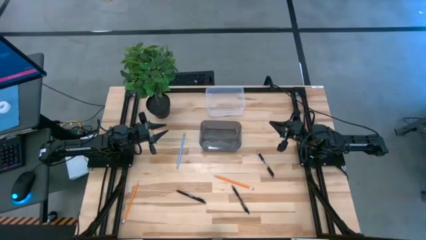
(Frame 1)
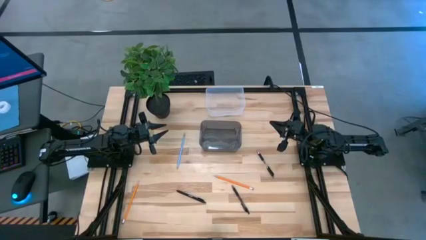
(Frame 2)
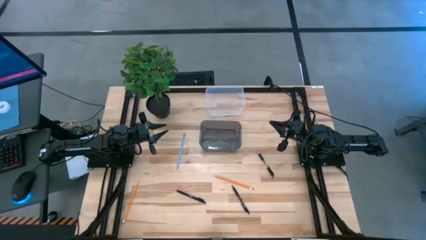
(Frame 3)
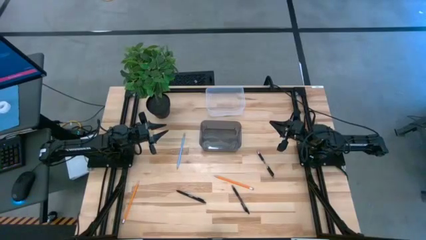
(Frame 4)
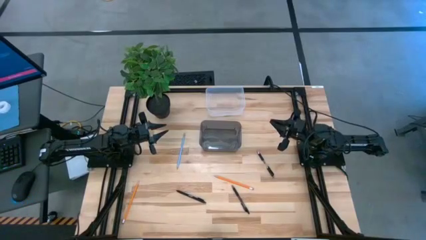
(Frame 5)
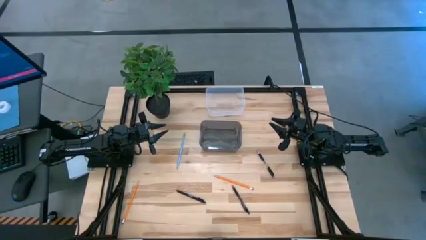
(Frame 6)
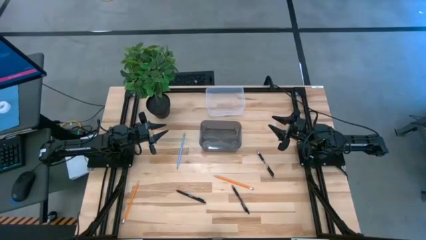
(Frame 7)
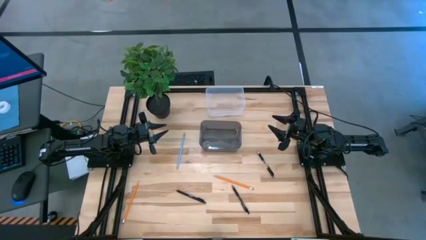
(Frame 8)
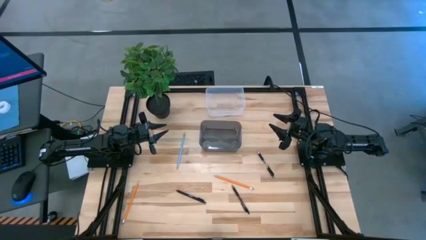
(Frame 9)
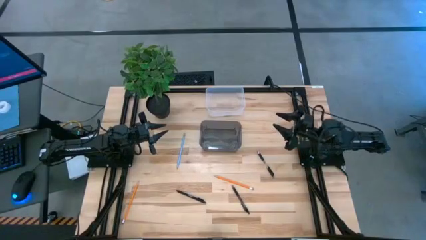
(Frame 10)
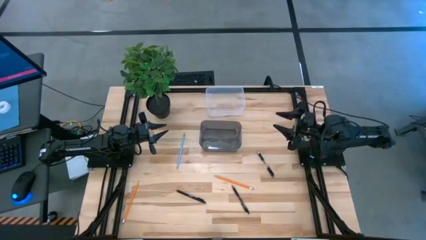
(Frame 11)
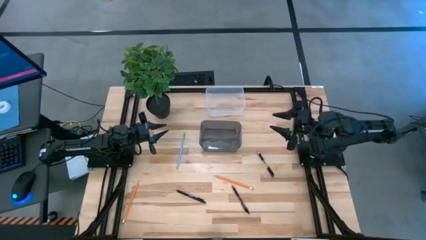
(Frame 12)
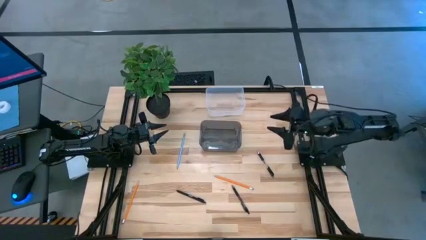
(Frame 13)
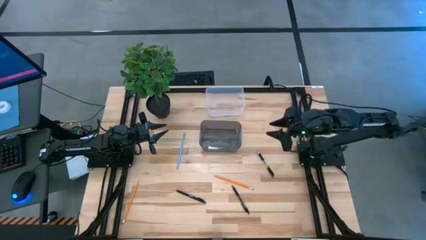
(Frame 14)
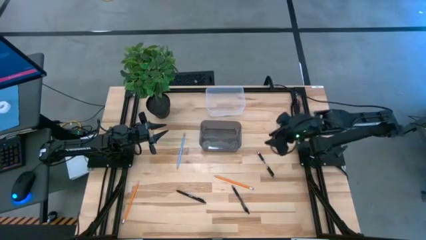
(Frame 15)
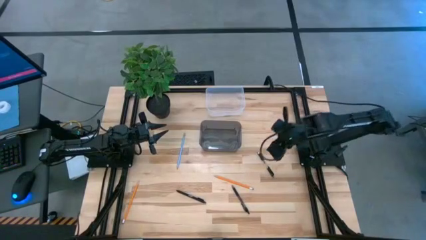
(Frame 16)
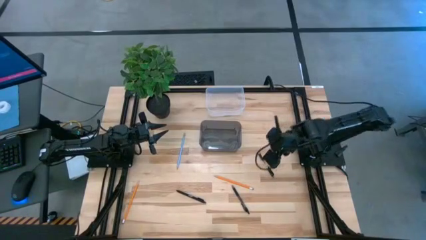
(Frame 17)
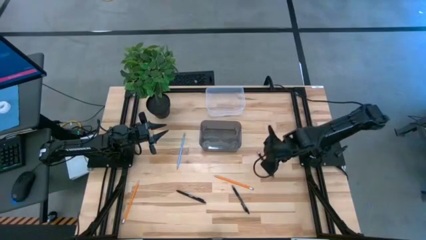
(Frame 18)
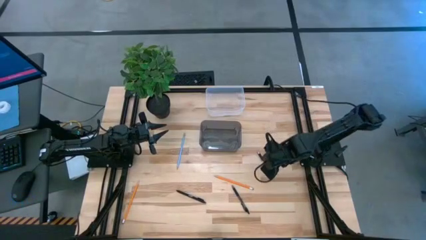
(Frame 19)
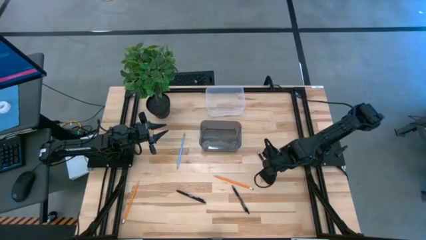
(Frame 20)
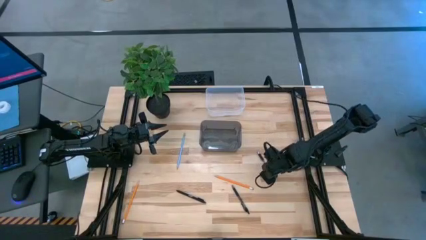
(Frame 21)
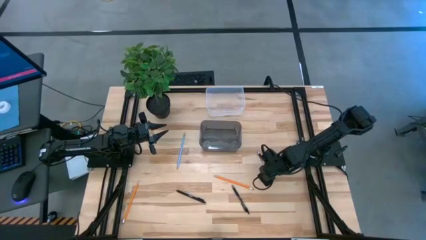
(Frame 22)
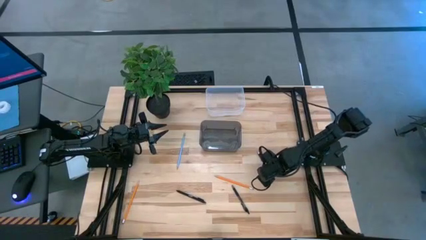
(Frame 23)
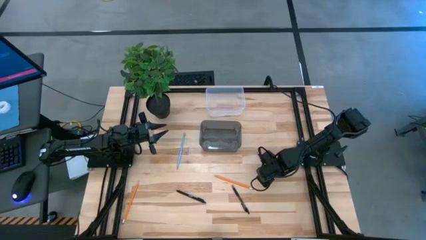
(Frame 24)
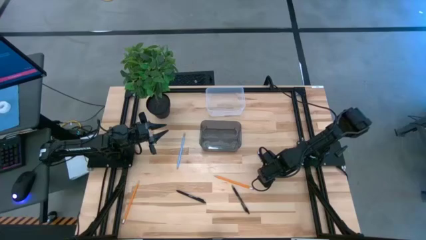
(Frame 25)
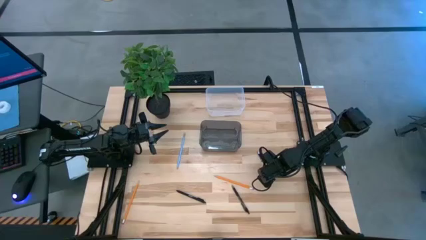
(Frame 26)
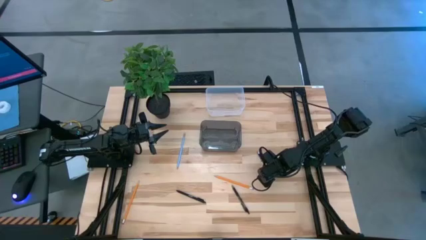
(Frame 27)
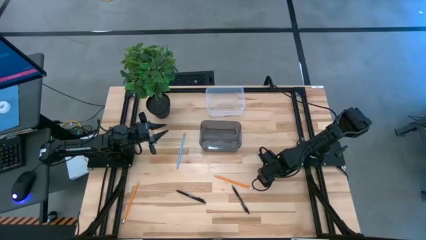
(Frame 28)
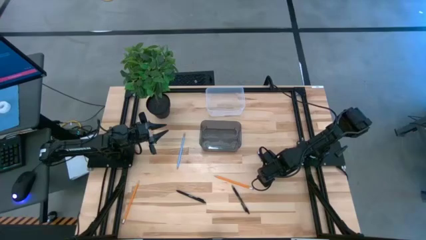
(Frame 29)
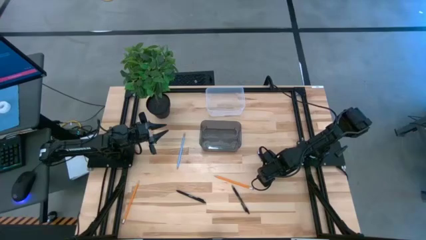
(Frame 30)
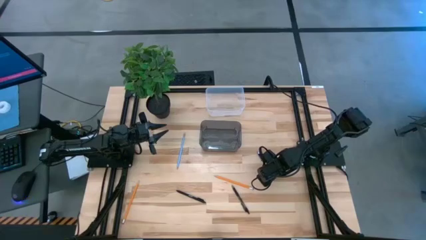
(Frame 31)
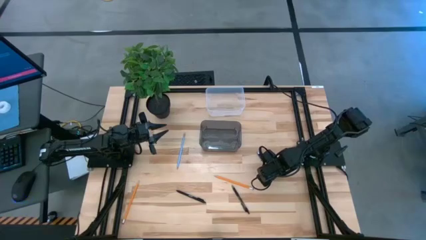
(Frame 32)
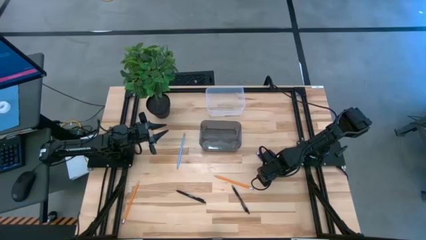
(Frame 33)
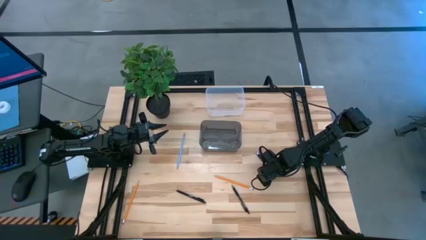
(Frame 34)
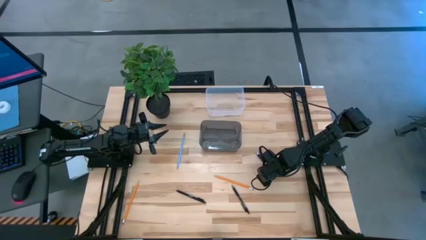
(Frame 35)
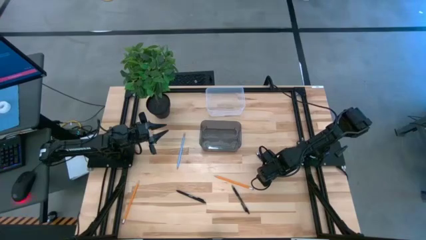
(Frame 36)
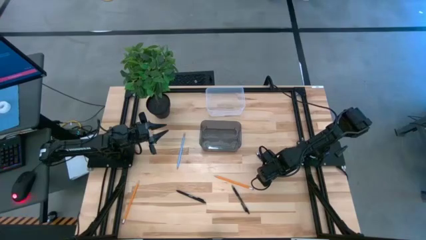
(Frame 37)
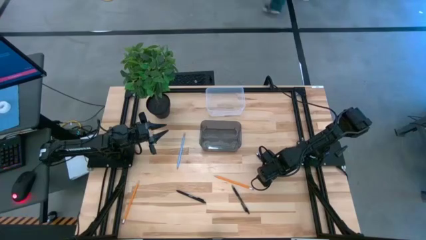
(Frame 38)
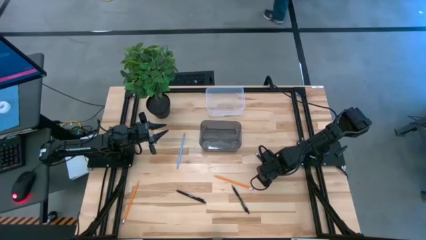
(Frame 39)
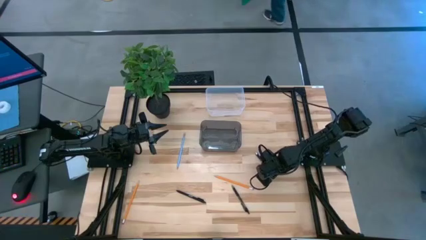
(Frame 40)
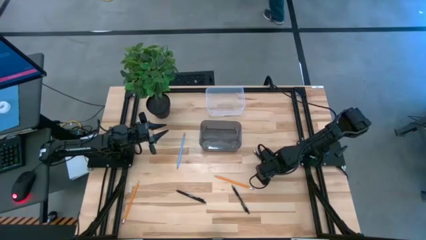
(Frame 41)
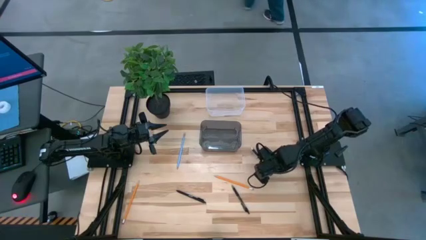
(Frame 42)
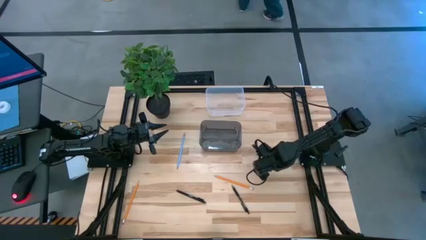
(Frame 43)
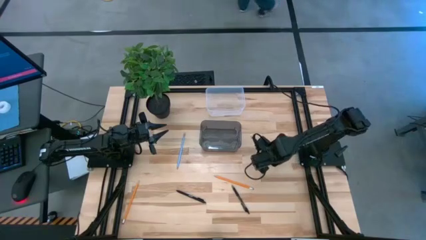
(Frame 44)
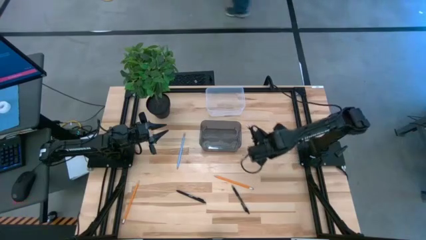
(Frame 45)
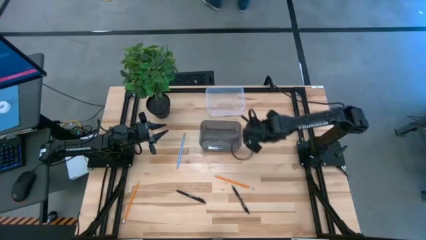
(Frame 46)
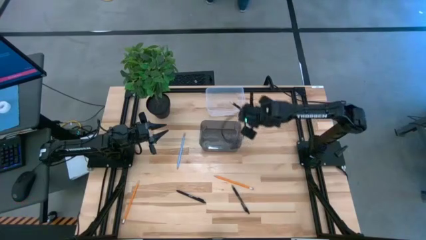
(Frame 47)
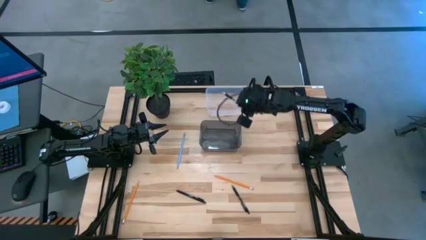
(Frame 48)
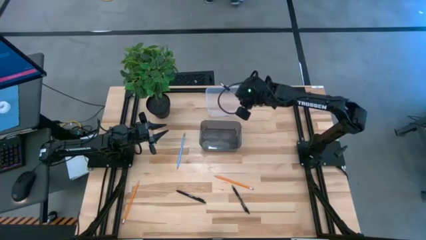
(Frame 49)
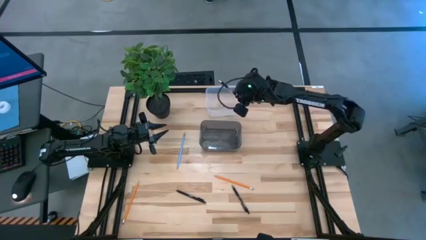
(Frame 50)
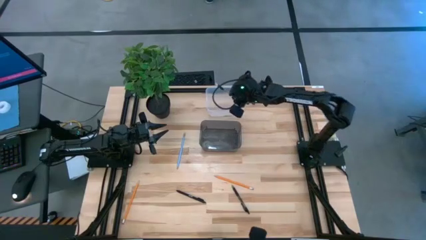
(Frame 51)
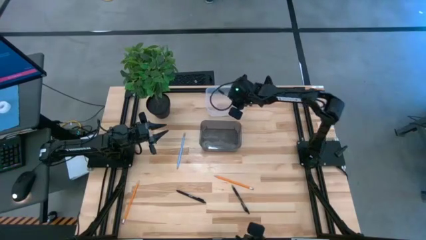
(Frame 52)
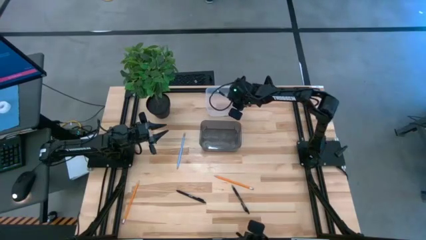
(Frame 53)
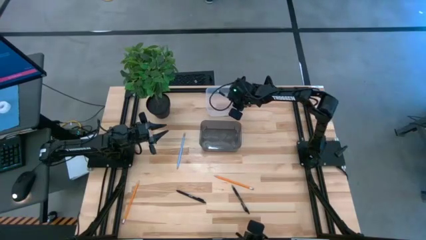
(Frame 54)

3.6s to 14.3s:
Task: Sort pens & pencils
Put the top right black pen into the transparent bin
